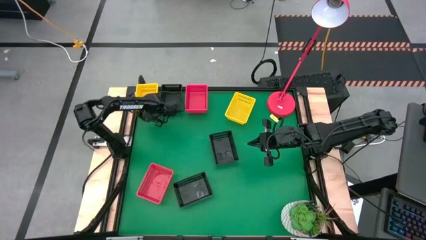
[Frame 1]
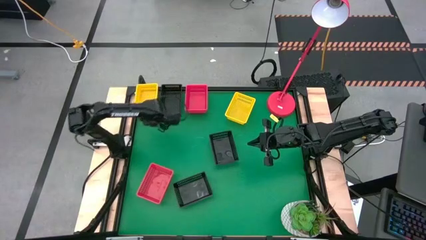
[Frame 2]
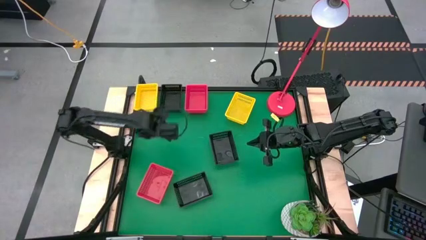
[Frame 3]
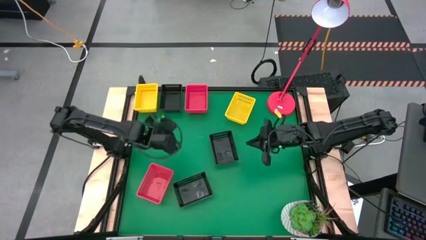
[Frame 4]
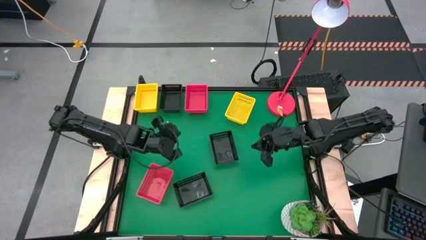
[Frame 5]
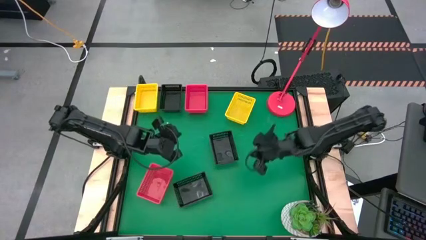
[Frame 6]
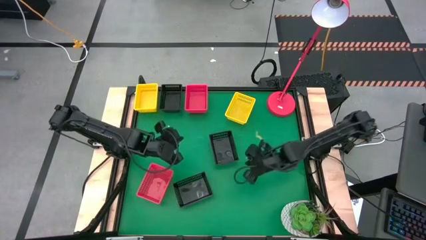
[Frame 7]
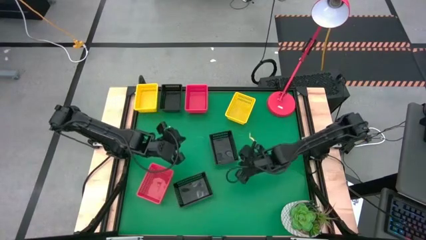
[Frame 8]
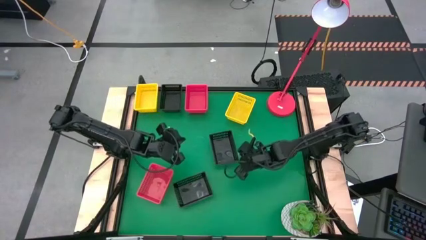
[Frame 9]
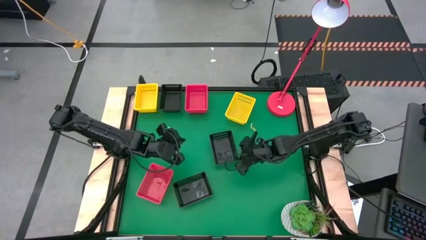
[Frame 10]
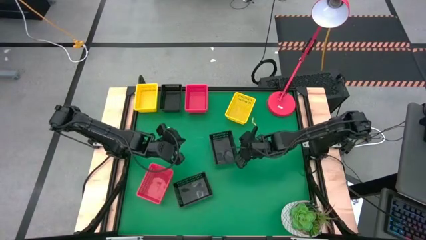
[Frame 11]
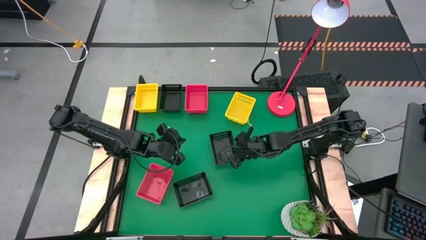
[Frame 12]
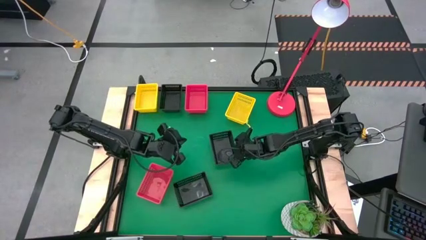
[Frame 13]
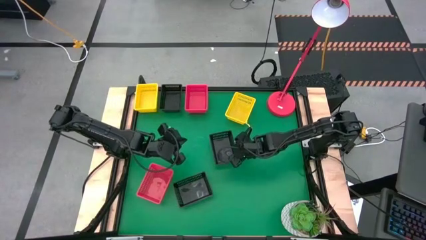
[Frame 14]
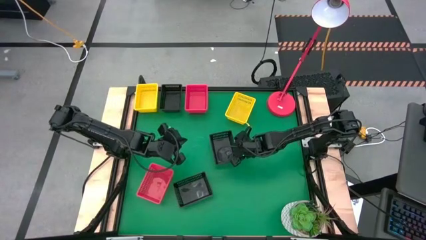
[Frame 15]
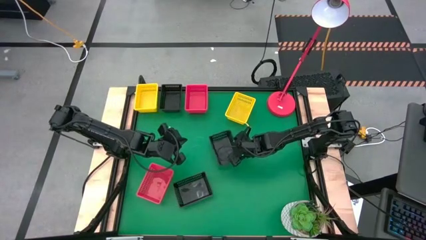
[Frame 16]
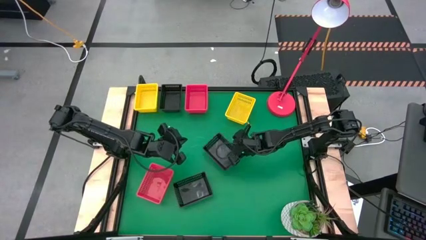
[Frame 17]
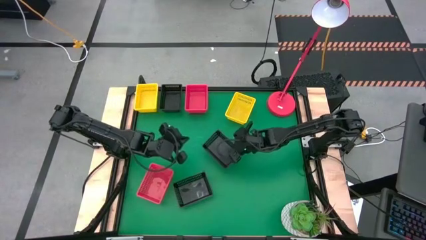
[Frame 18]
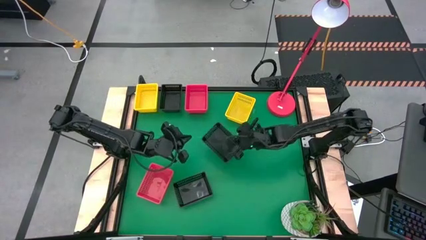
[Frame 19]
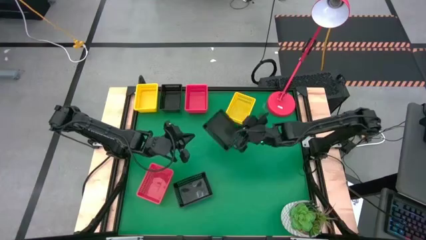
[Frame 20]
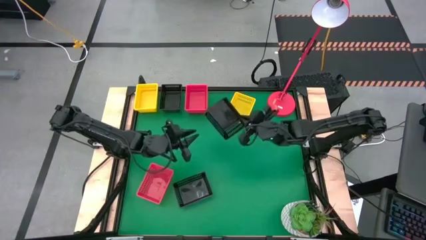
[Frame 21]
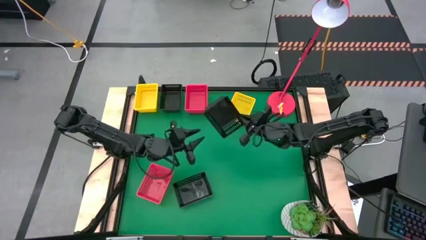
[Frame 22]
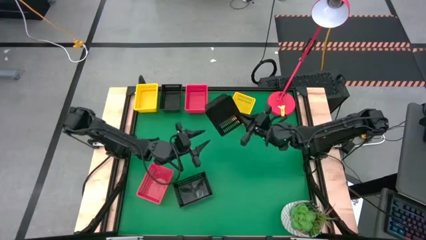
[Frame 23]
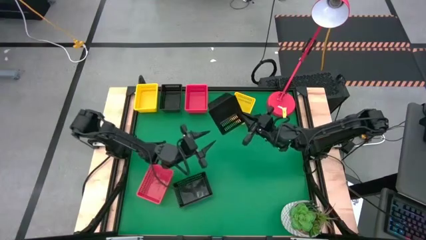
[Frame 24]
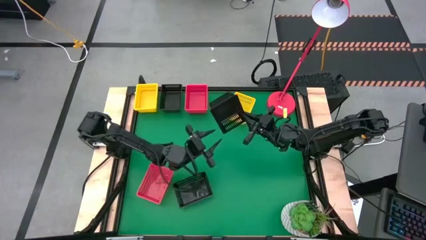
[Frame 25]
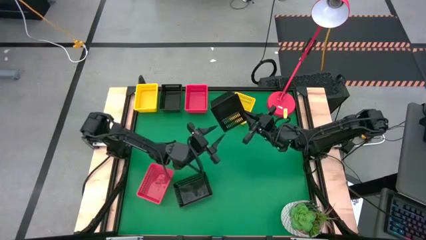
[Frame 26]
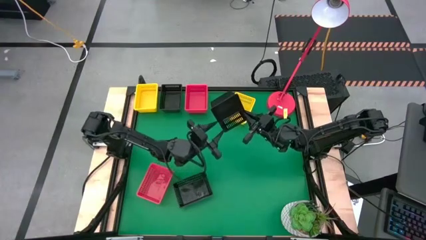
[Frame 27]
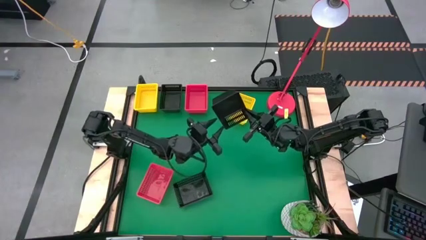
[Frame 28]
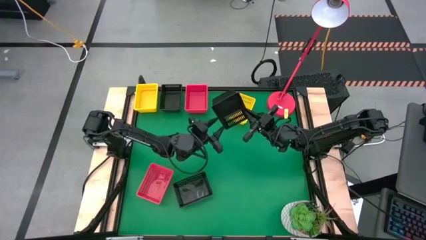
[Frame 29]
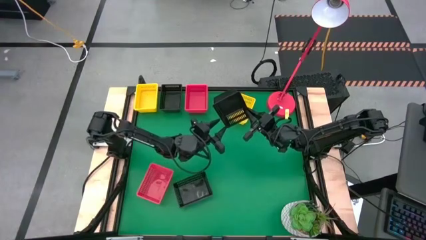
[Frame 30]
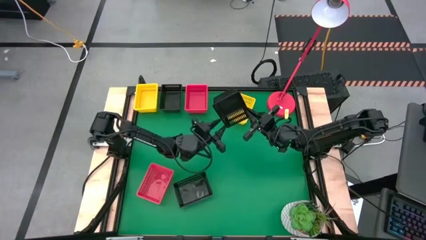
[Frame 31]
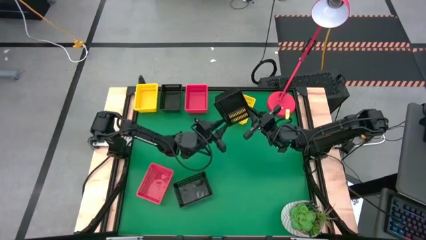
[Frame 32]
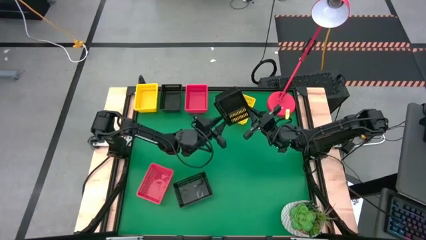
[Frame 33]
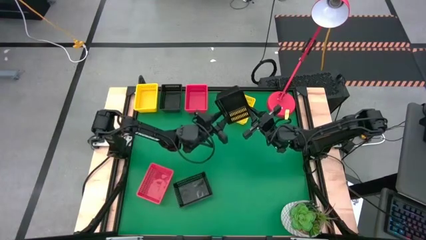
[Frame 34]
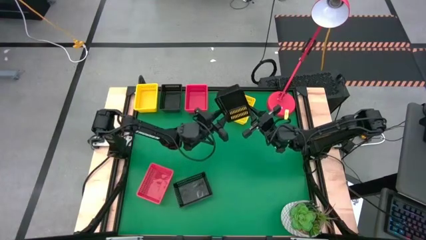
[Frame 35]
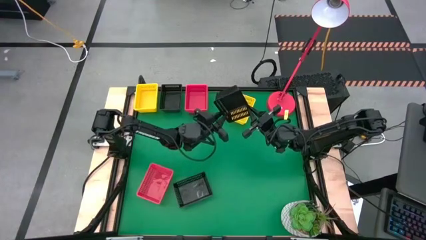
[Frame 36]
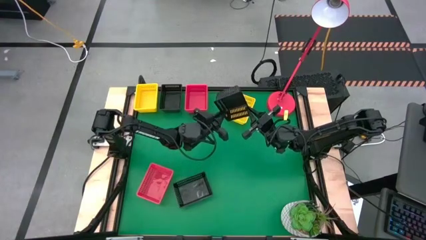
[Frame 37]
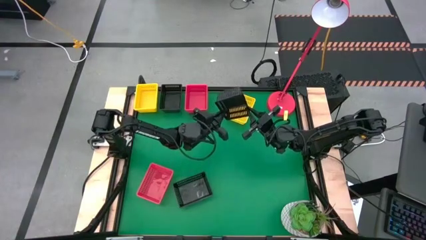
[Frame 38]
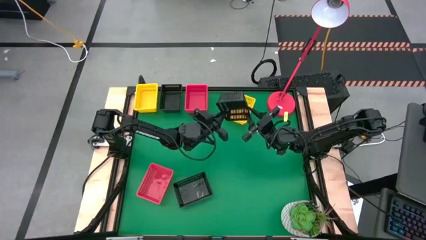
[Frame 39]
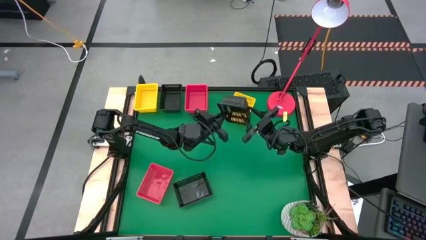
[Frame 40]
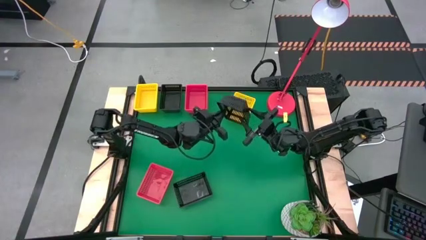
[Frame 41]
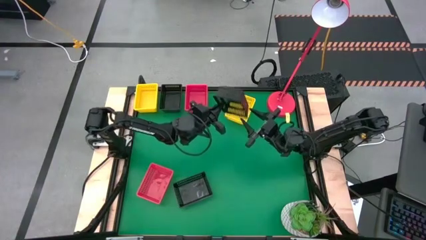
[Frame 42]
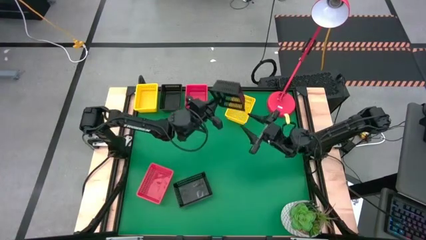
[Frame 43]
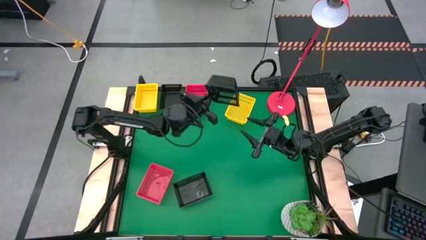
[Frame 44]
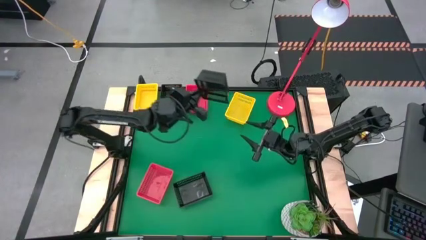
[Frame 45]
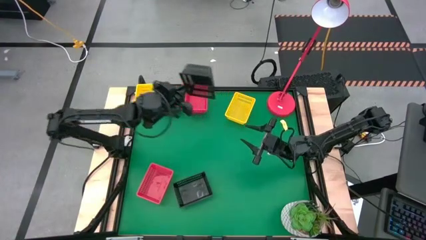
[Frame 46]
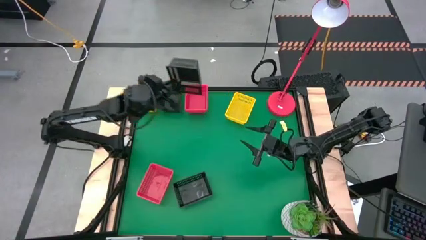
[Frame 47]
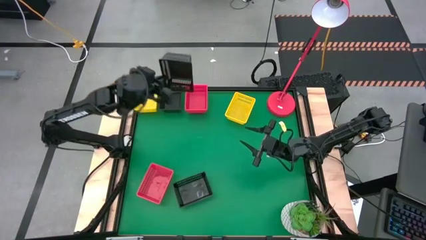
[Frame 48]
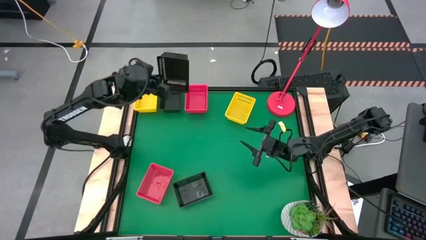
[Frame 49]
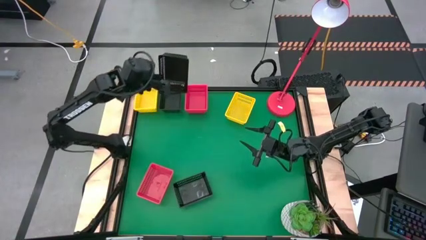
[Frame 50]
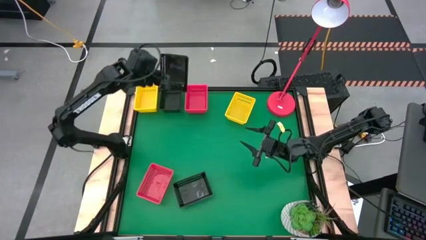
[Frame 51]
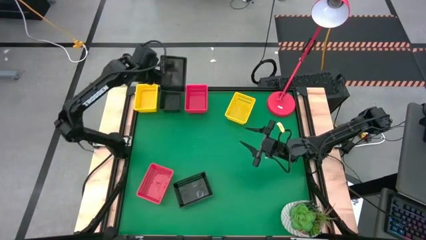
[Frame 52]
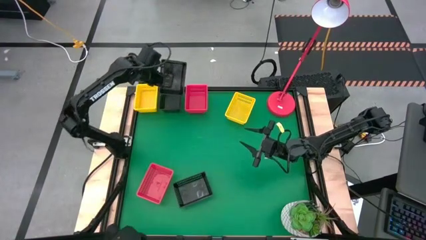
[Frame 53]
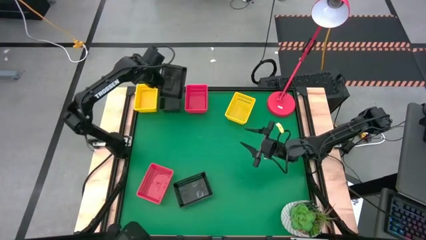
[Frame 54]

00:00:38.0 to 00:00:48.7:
Stack the middle black bin on top of the top black bin
